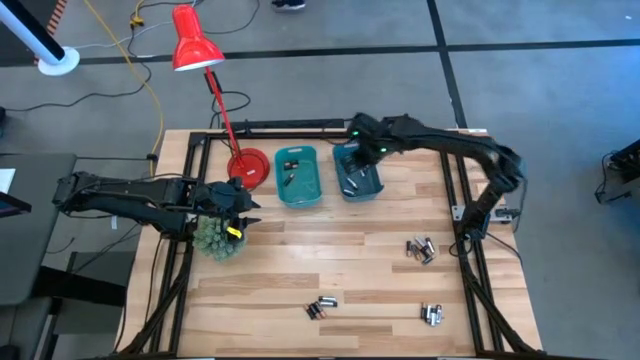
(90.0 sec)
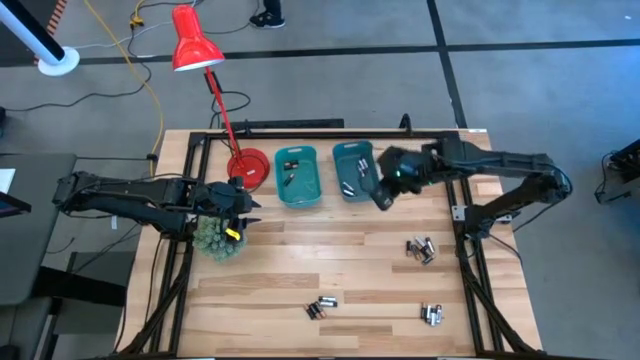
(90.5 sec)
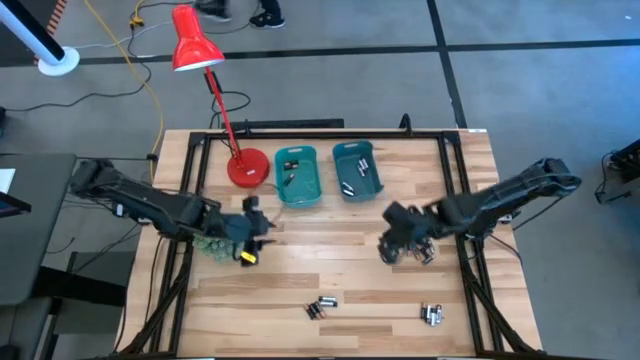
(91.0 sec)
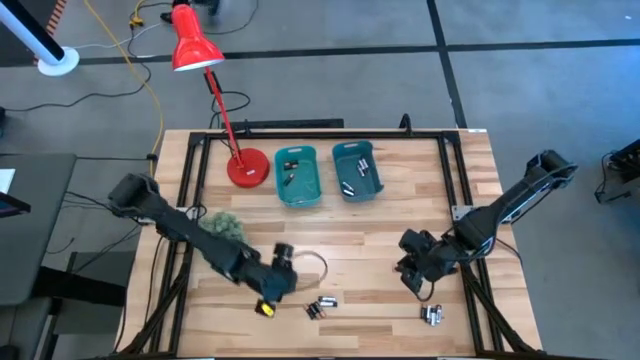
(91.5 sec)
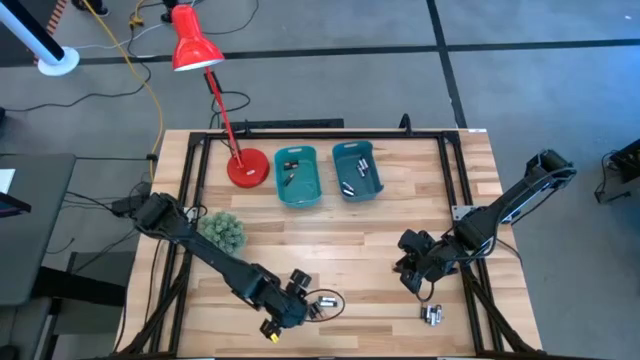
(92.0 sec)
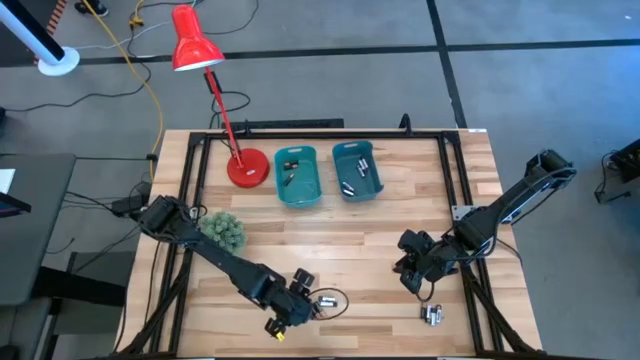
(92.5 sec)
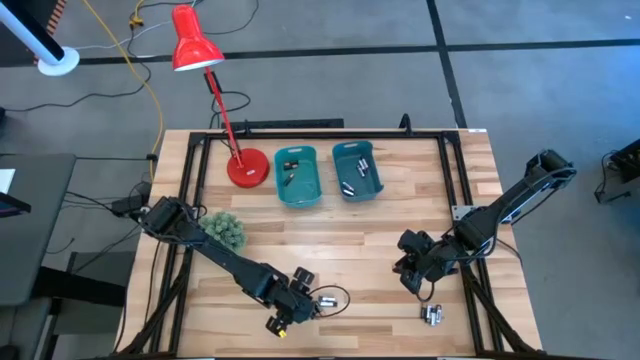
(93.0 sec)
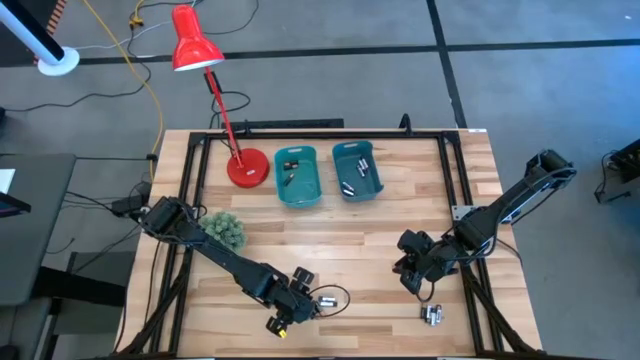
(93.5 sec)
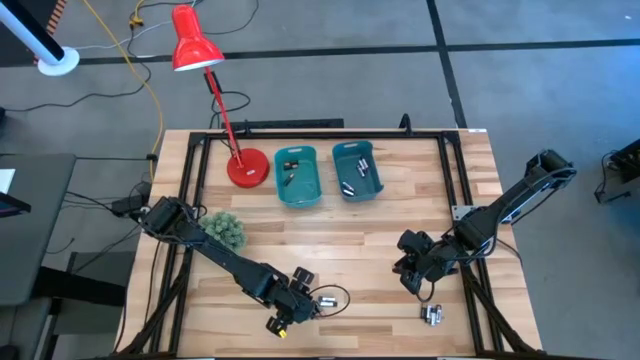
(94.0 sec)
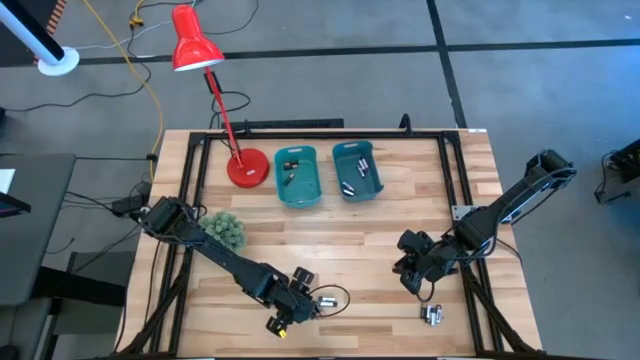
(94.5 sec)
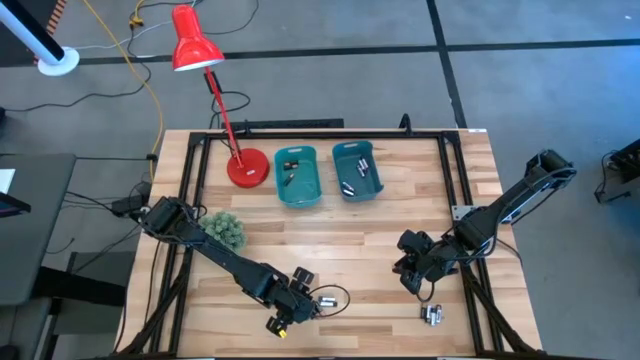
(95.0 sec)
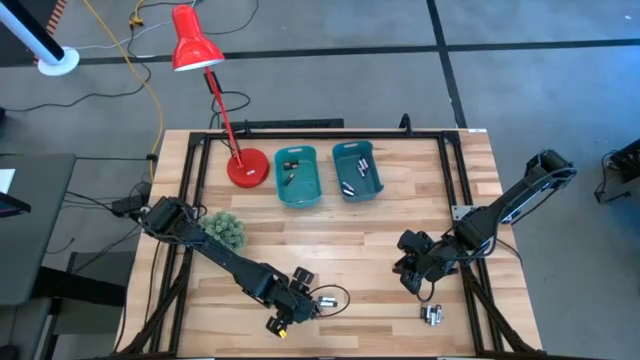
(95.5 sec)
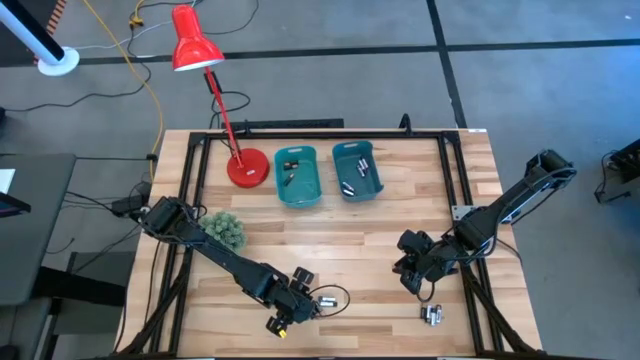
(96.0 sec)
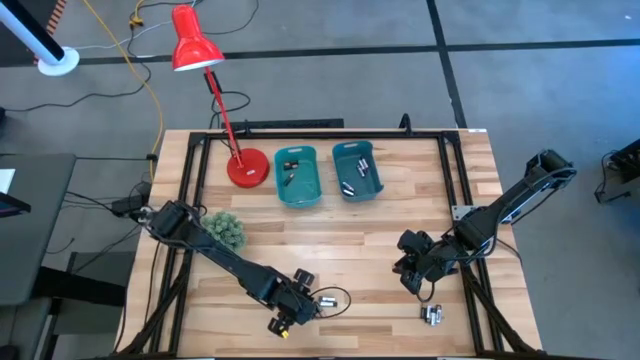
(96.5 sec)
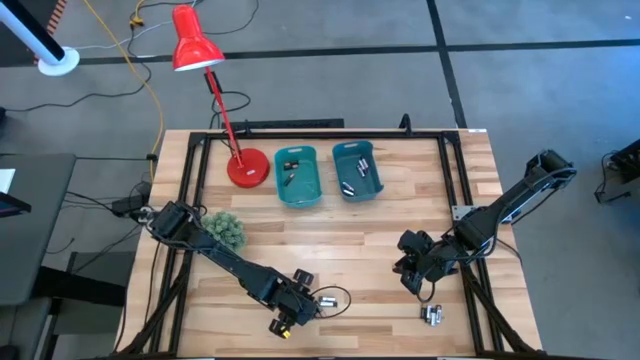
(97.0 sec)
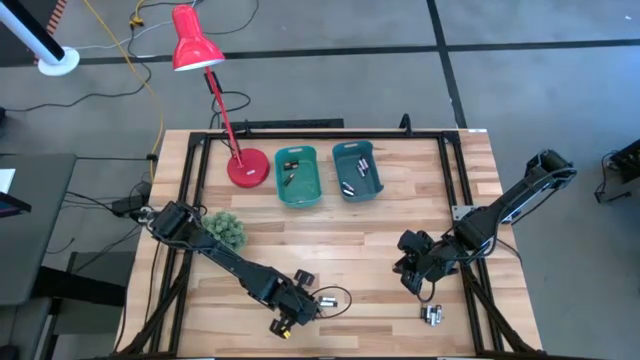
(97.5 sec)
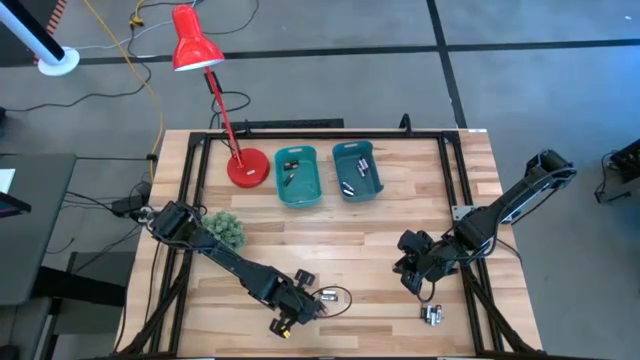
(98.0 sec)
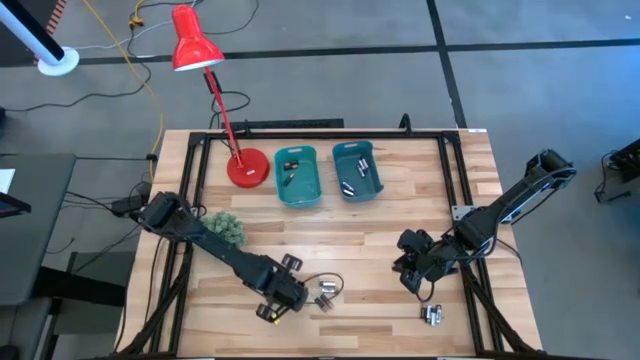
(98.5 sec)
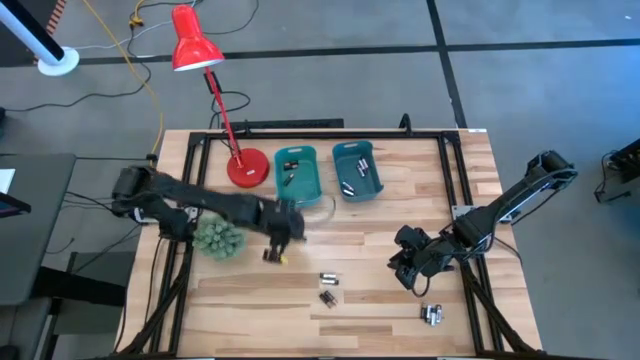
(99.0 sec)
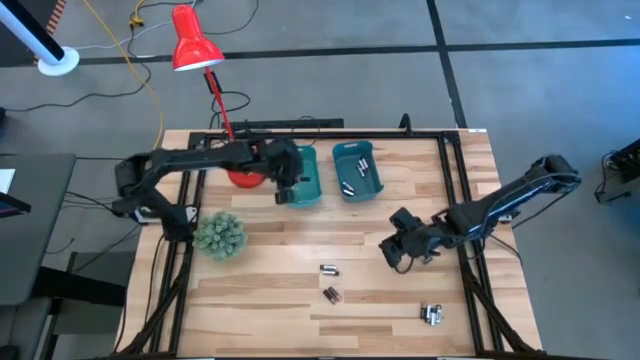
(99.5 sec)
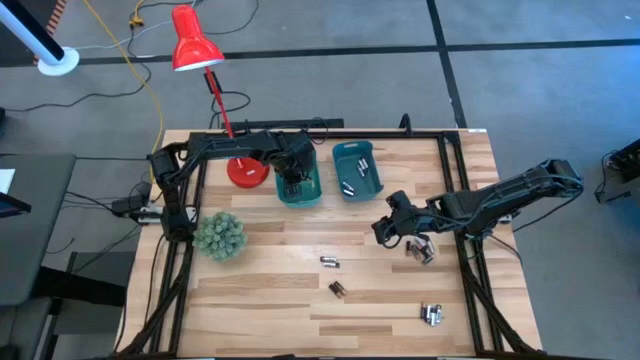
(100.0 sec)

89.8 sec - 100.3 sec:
Task: Sort batteries
Put the black battery into the green bin

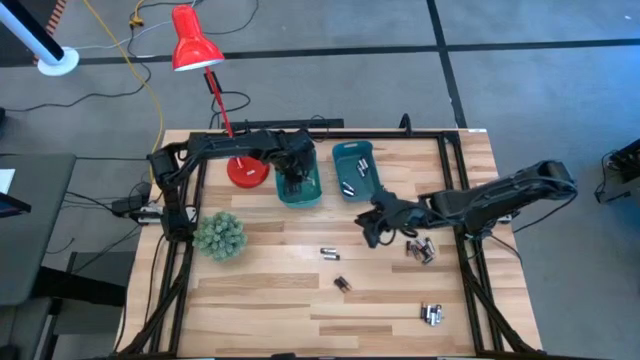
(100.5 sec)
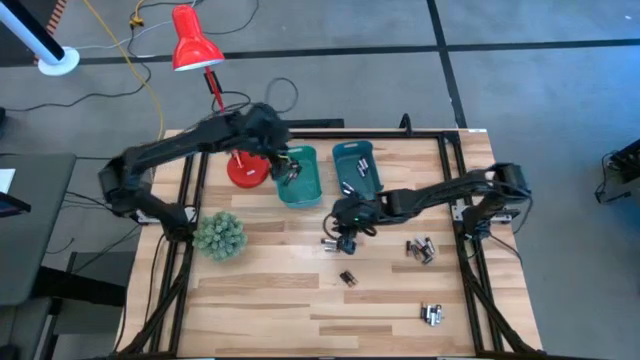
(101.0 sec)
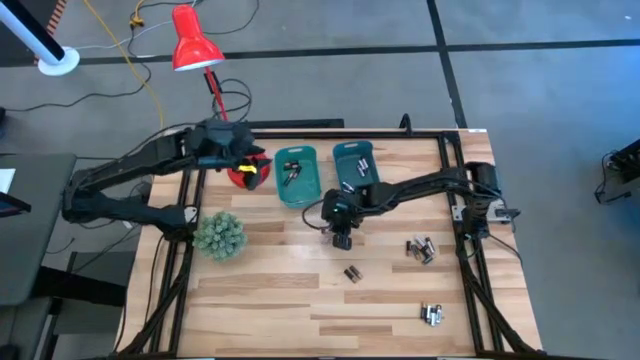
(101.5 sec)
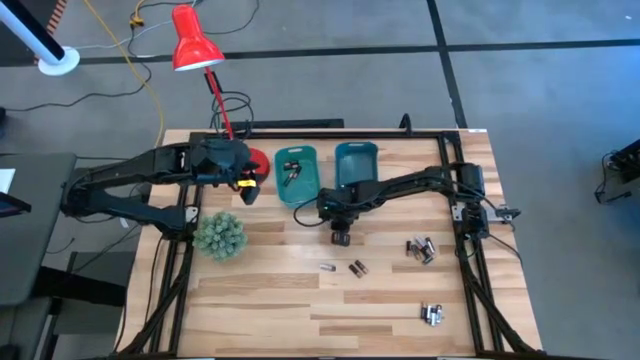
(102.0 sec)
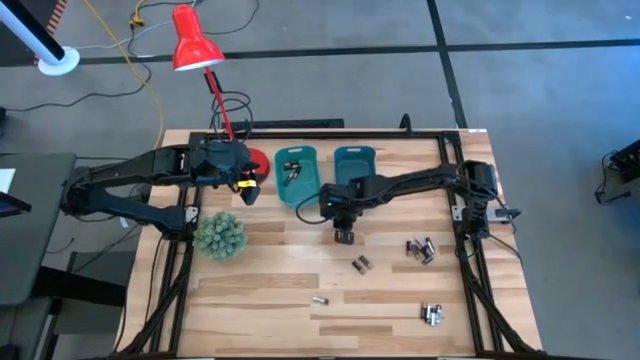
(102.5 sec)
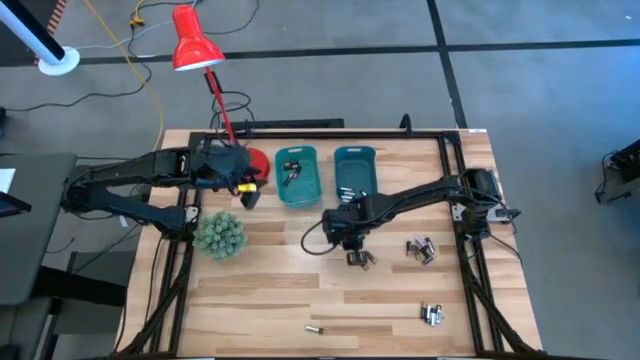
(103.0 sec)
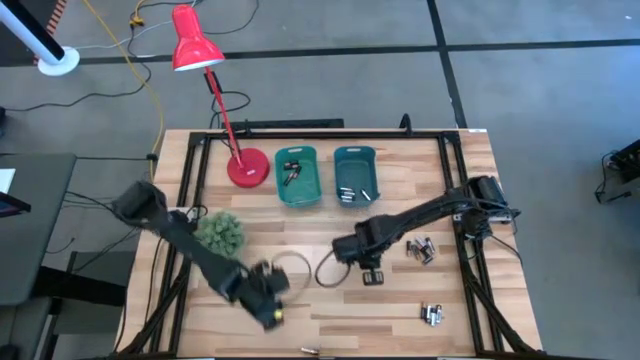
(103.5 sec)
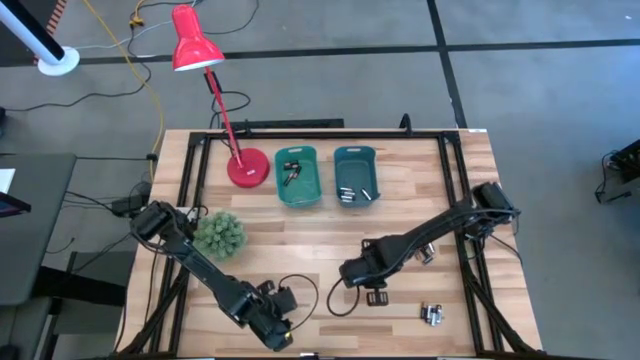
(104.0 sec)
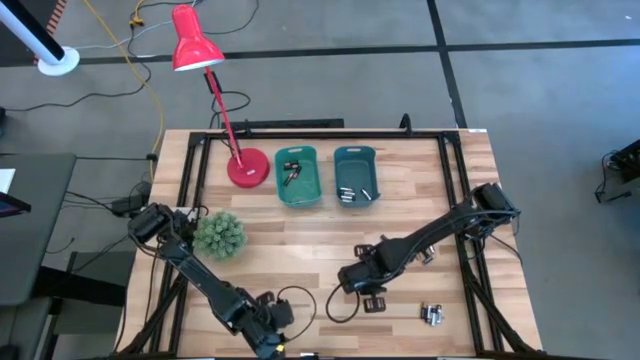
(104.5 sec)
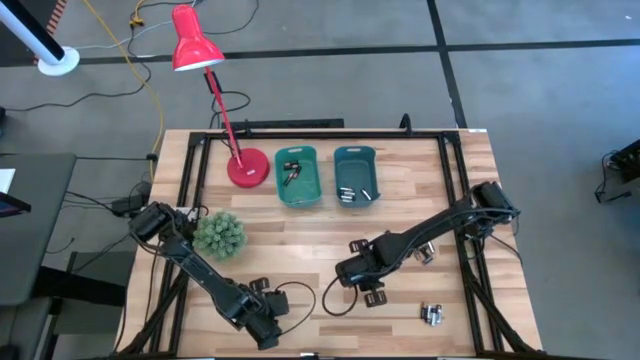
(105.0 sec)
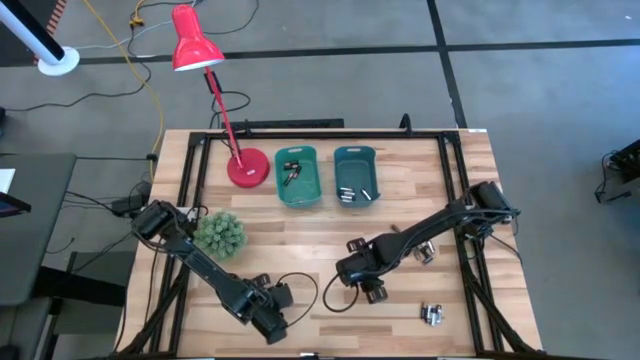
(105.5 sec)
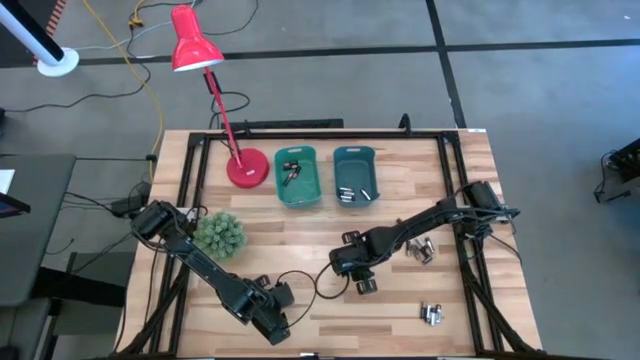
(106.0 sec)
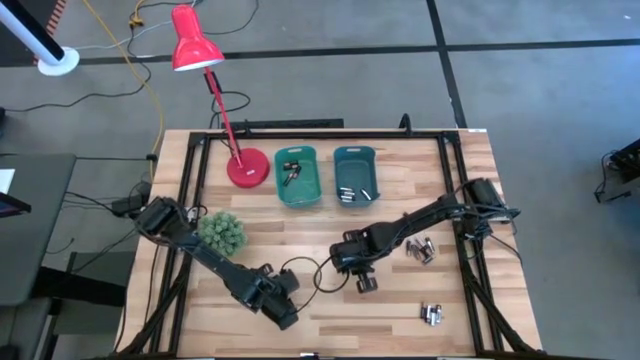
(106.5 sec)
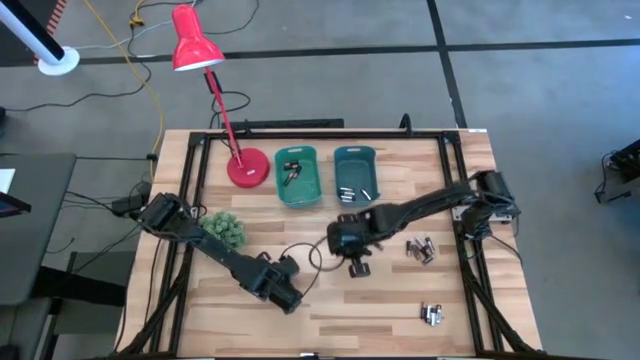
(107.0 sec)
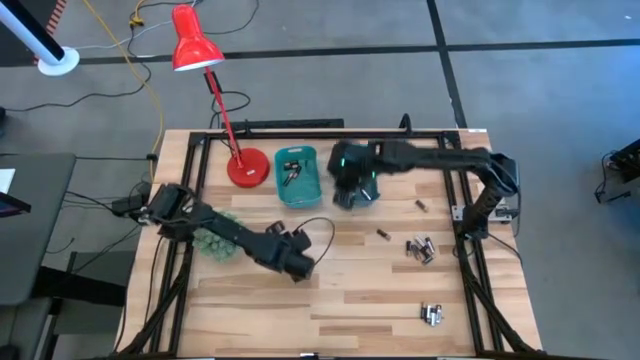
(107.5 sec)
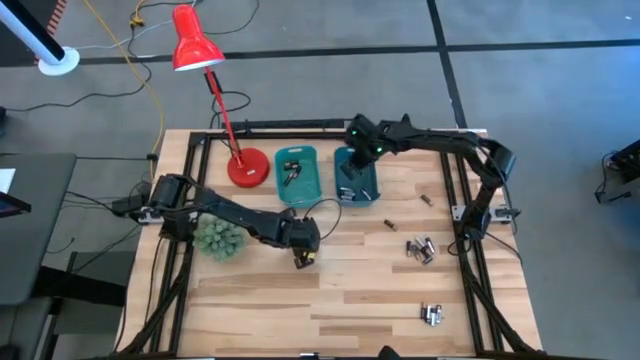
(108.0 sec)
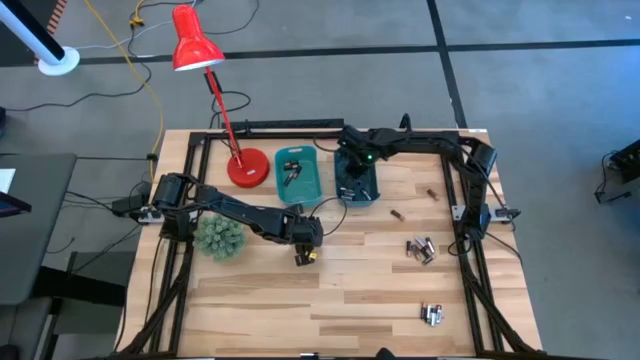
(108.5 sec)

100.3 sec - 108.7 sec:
Put the silver battery into the blue bin

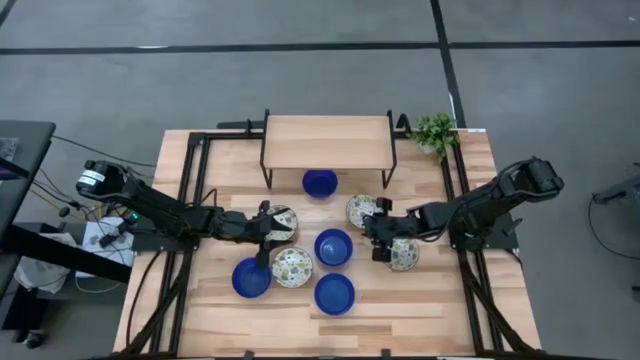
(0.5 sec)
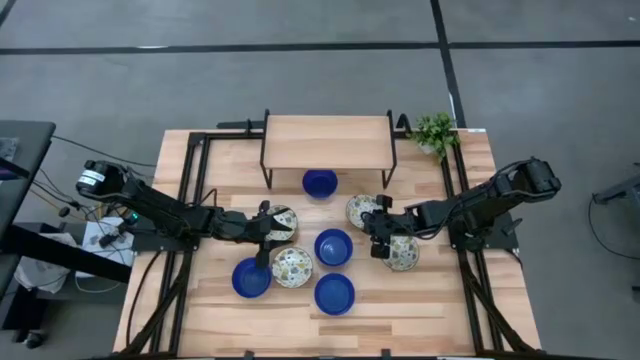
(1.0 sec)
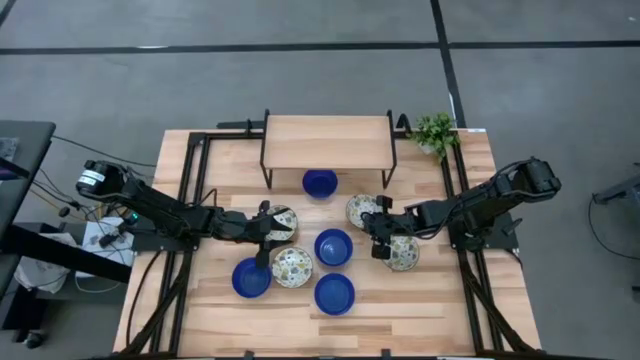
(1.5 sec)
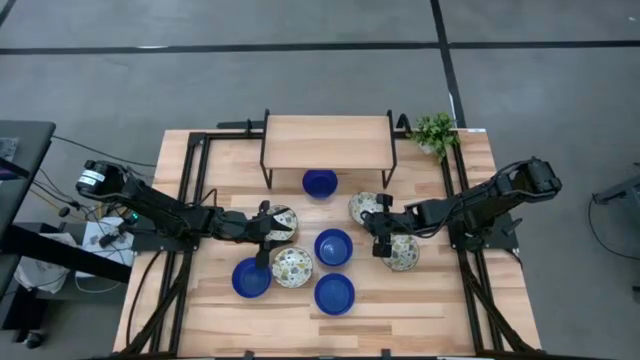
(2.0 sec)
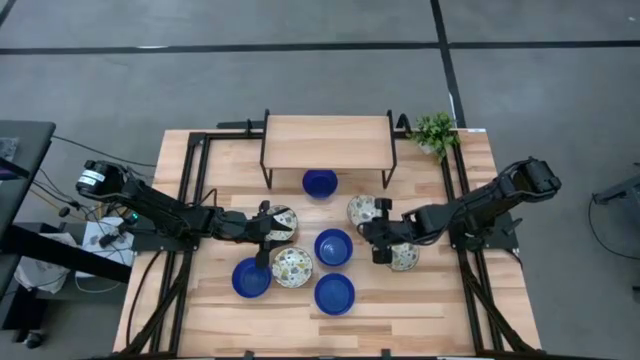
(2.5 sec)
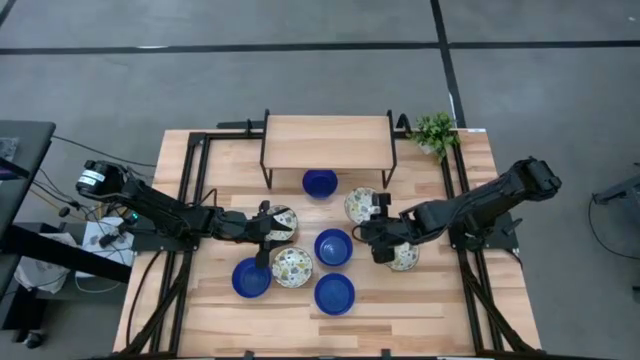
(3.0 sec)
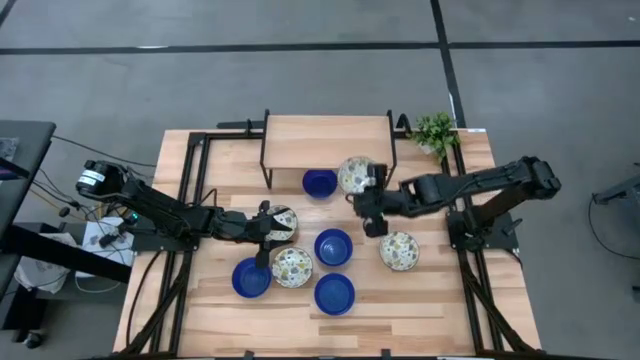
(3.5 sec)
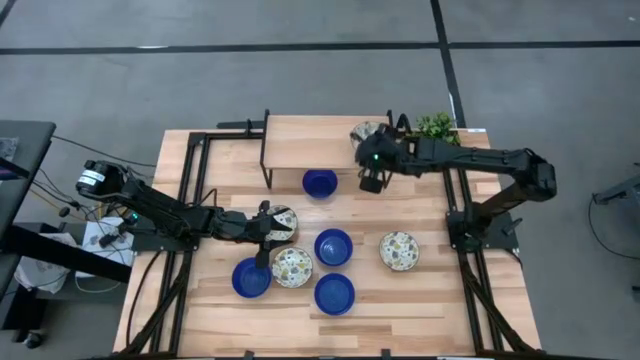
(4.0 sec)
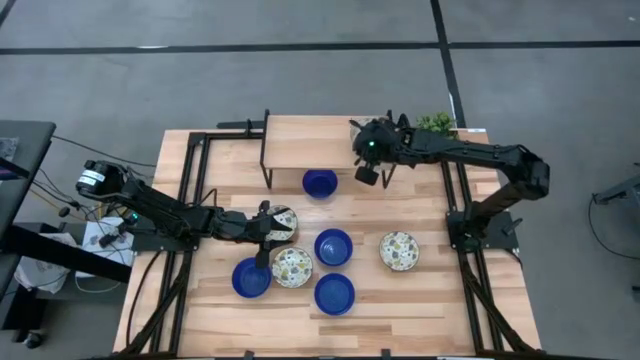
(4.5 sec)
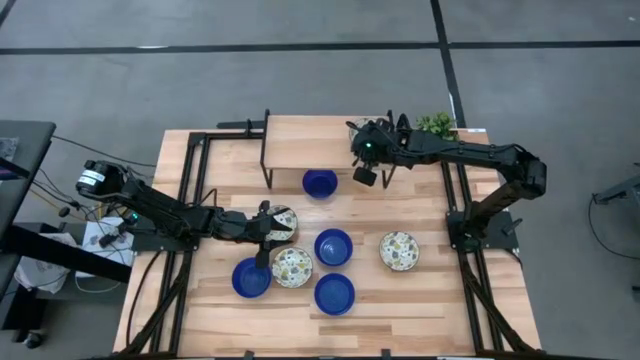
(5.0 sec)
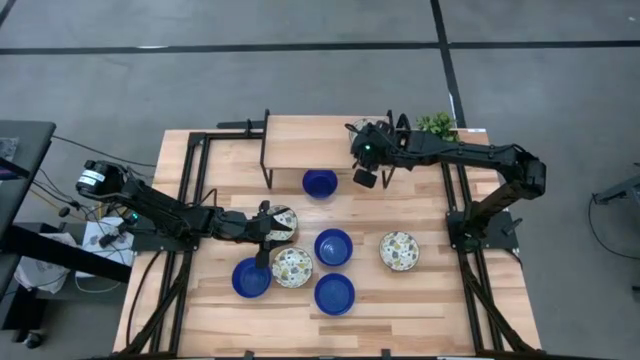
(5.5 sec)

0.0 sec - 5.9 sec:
Task: Pick & Place Mini bowls
Put the white patterned bowl on the shelf
